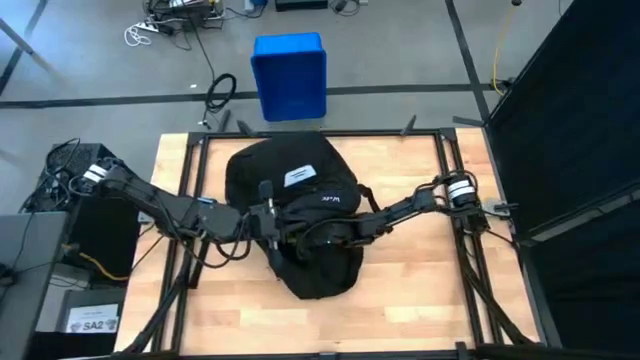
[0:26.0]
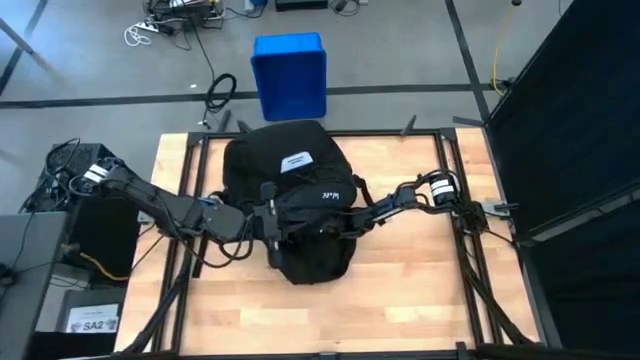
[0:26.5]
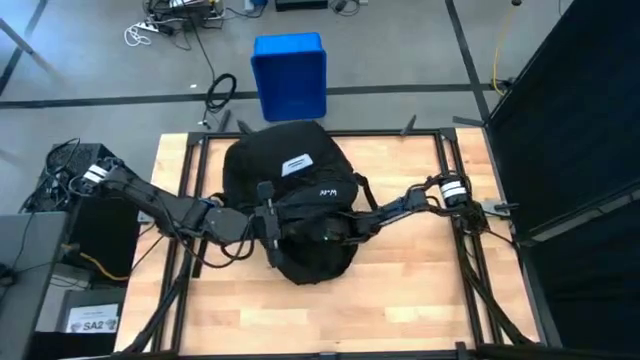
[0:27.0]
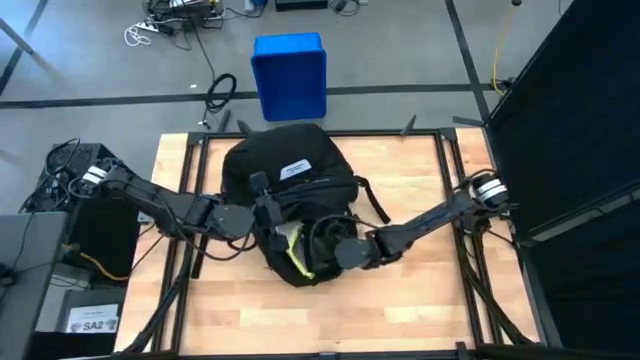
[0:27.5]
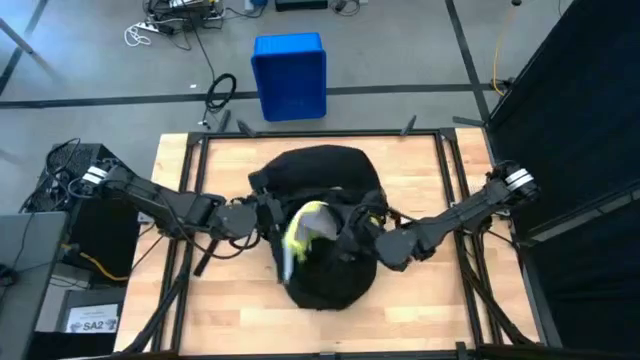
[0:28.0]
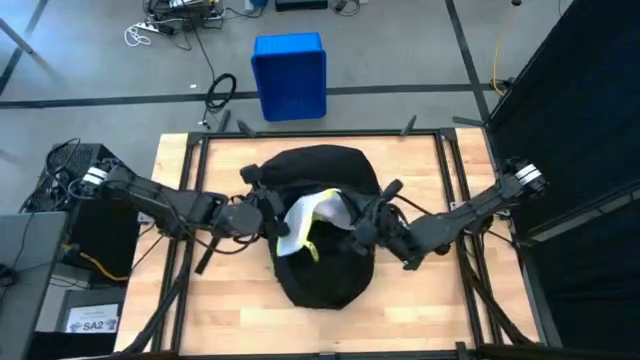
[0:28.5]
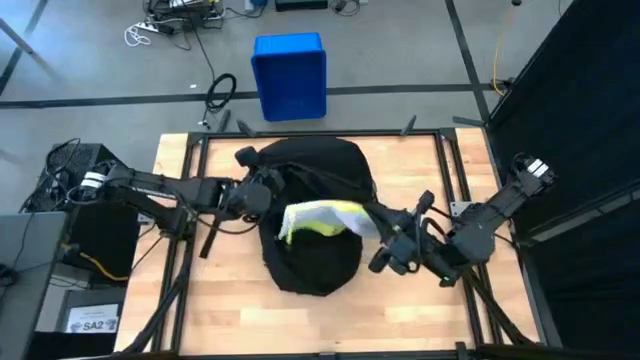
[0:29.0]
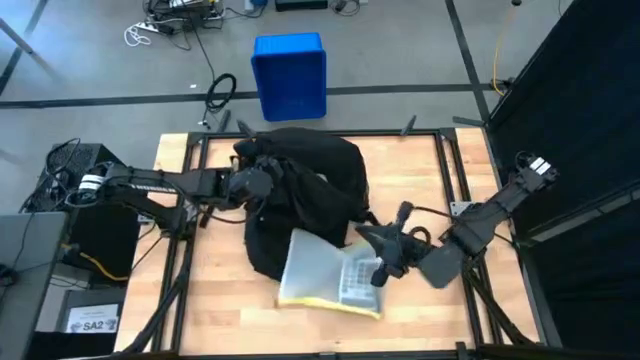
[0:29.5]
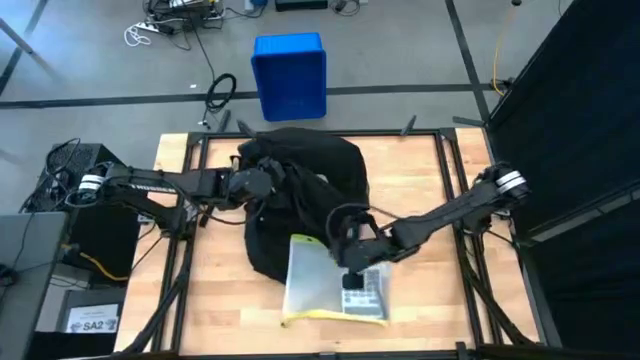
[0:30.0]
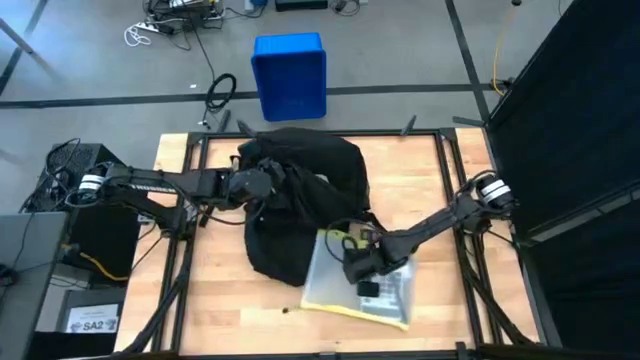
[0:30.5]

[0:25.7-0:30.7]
Task: Unpack backpack
Remove the zip bag from the backpack

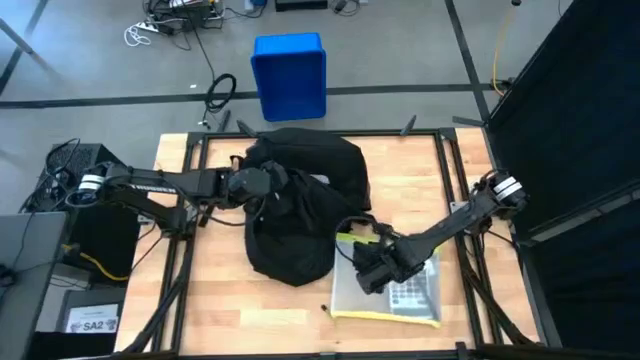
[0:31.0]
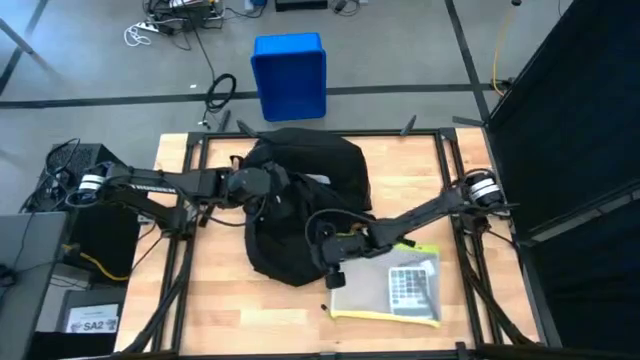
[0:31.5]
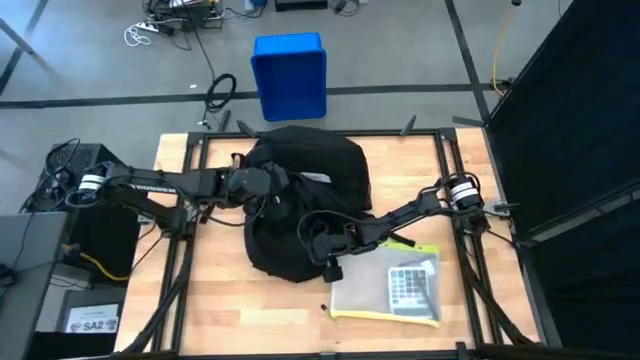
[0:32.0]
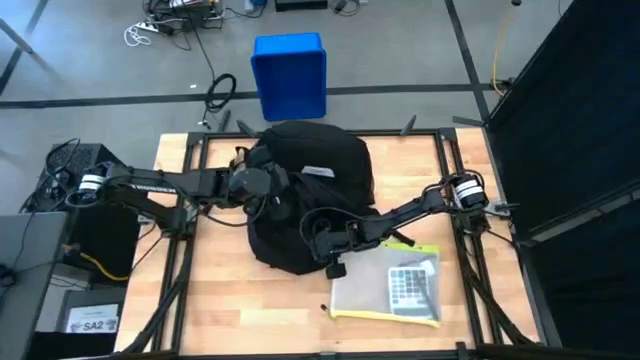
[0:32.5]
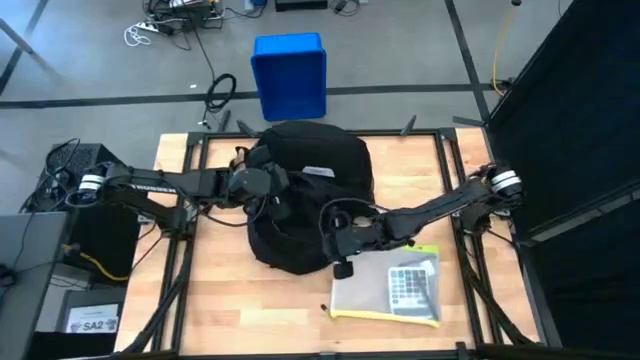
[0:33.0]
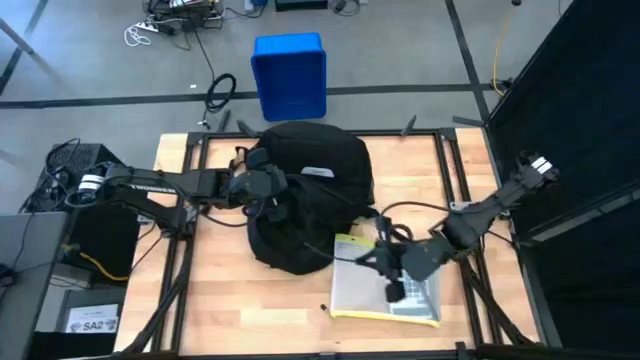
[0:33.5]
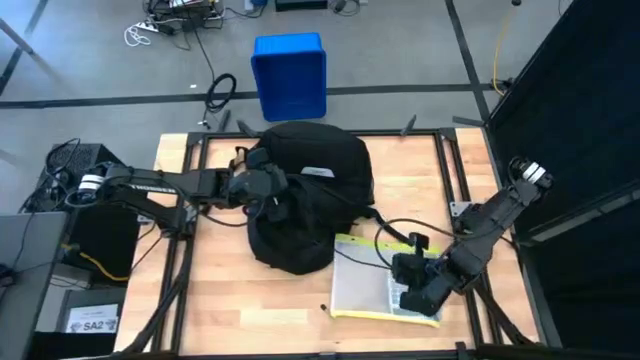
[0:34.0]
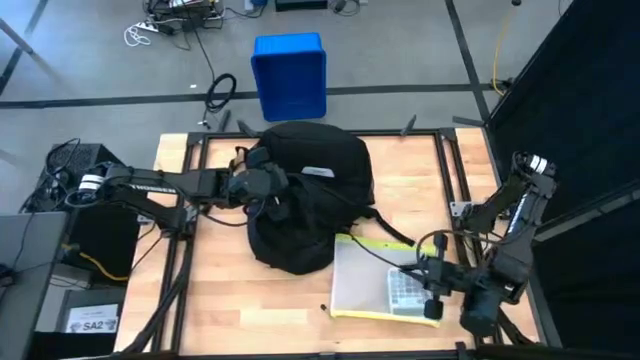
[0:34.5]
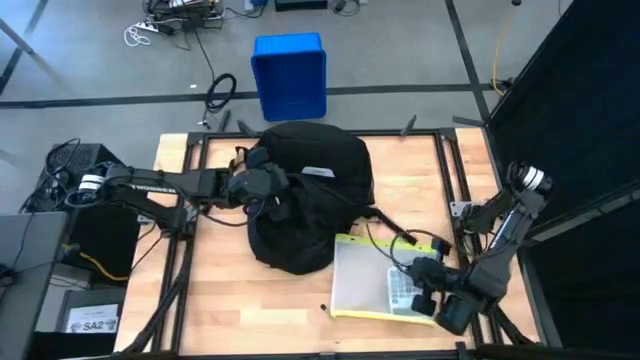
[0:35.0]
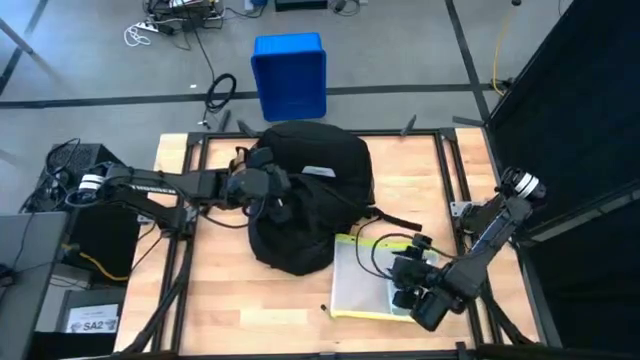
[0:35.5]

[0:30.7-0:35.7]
Remove the usb cable from the backpack

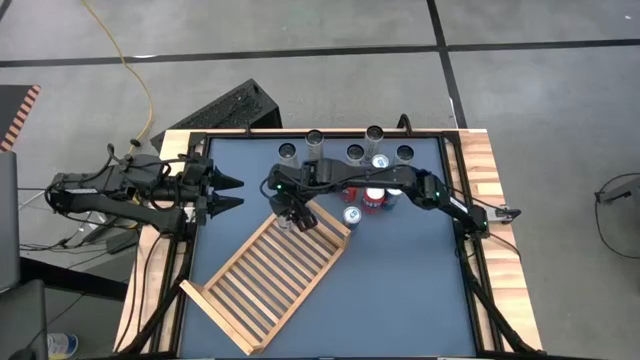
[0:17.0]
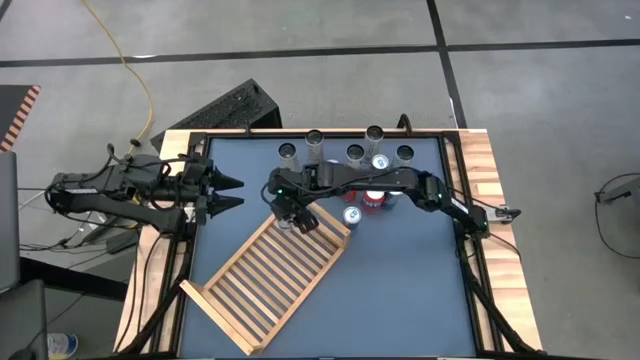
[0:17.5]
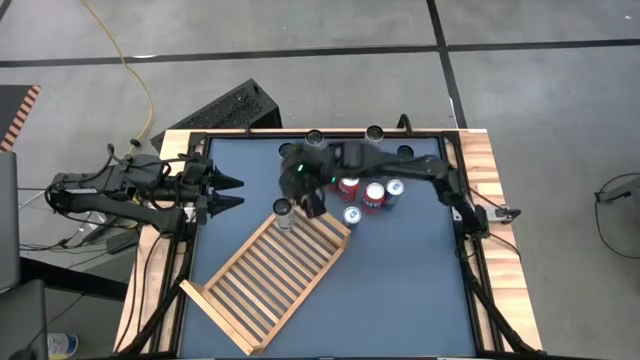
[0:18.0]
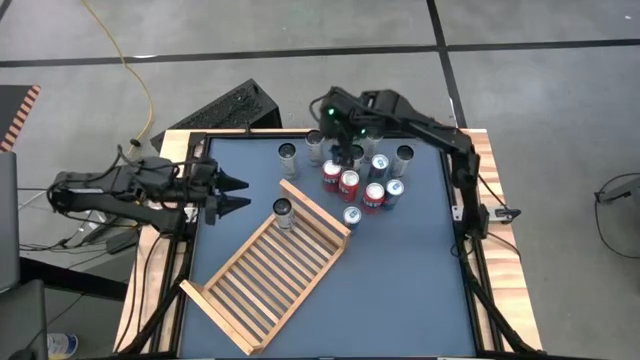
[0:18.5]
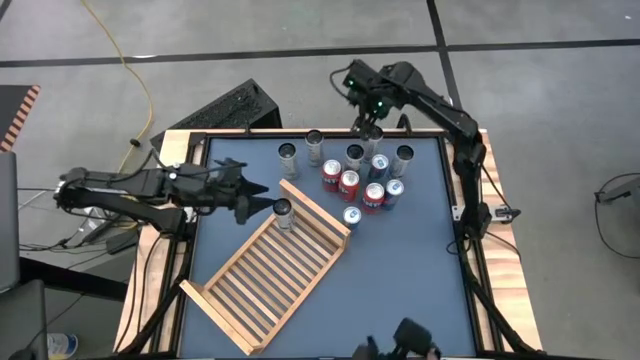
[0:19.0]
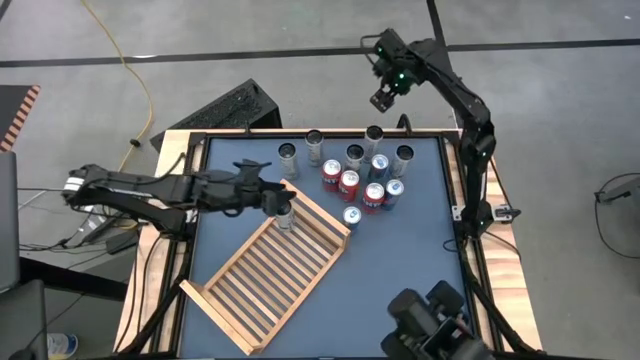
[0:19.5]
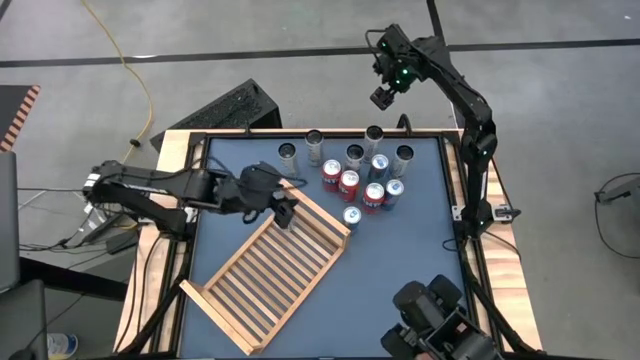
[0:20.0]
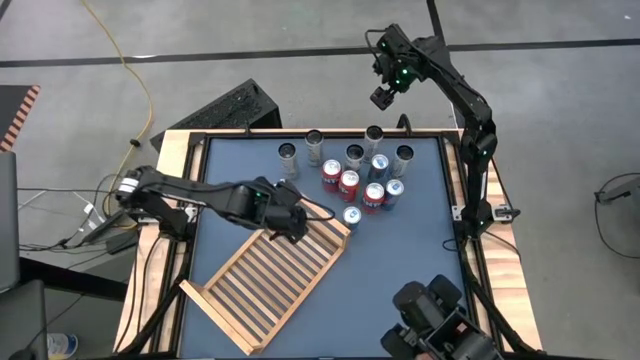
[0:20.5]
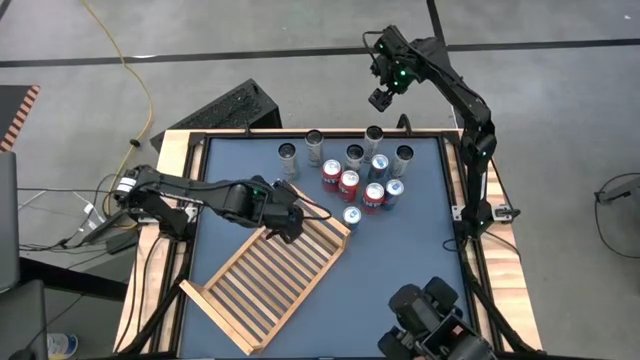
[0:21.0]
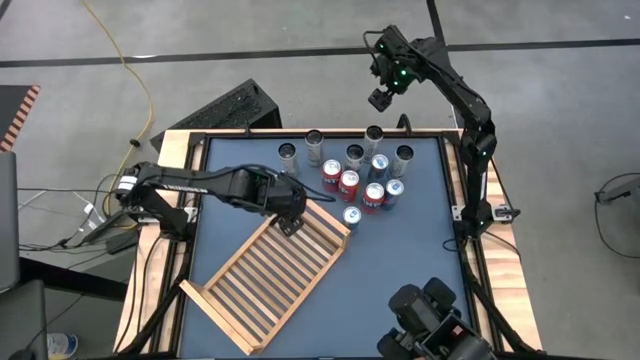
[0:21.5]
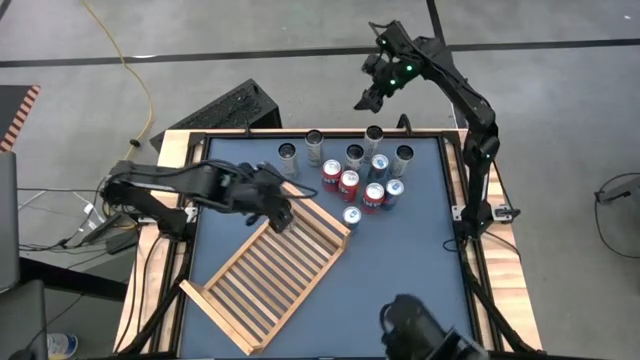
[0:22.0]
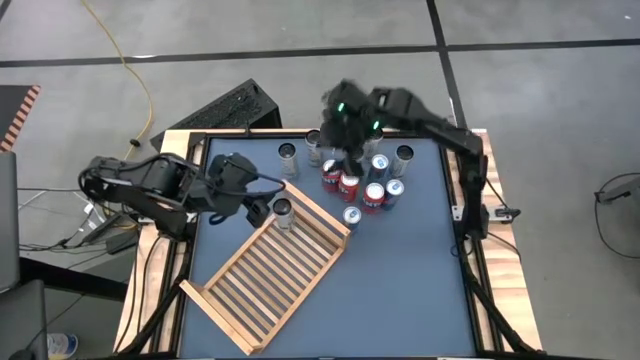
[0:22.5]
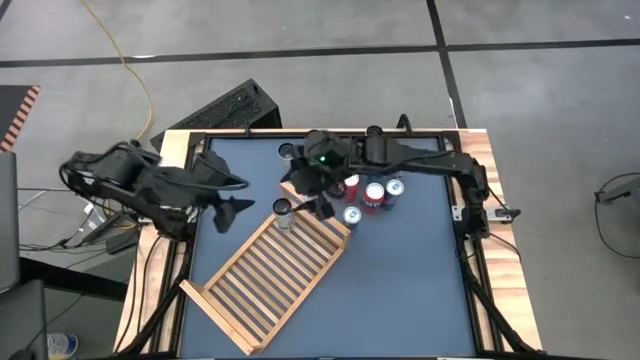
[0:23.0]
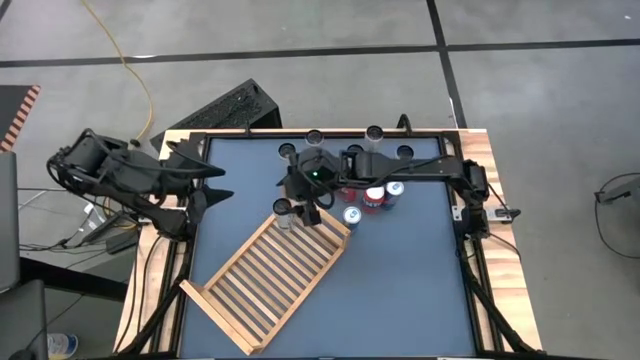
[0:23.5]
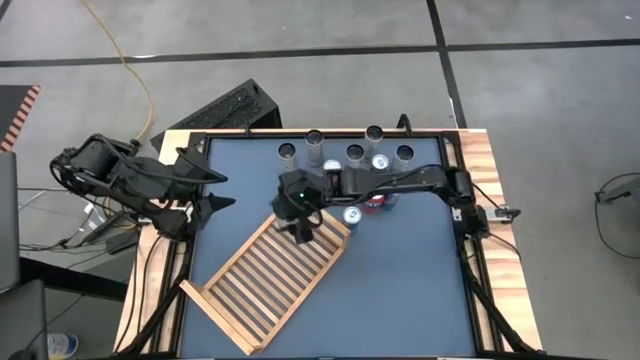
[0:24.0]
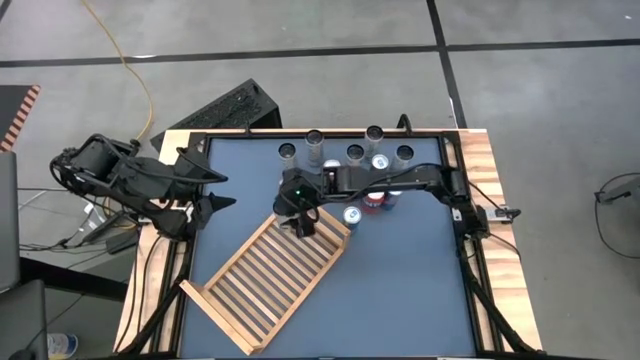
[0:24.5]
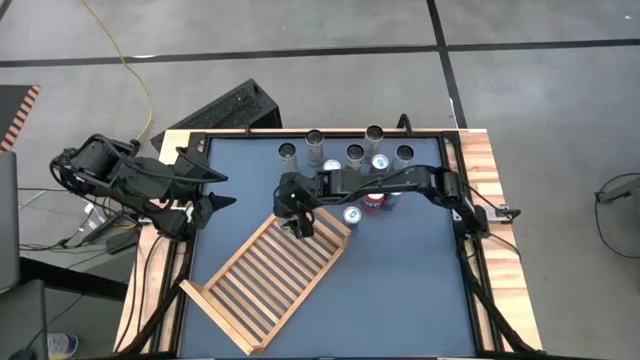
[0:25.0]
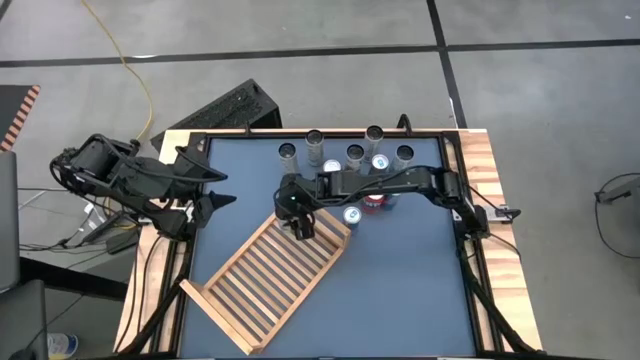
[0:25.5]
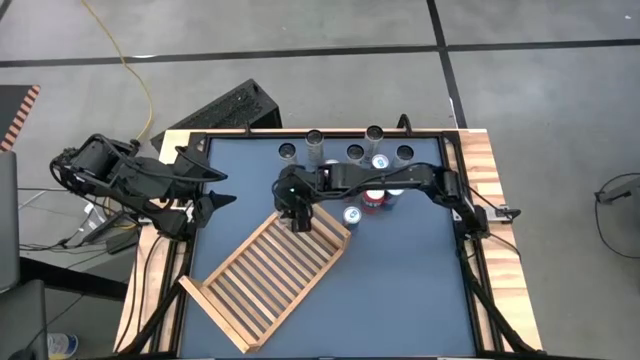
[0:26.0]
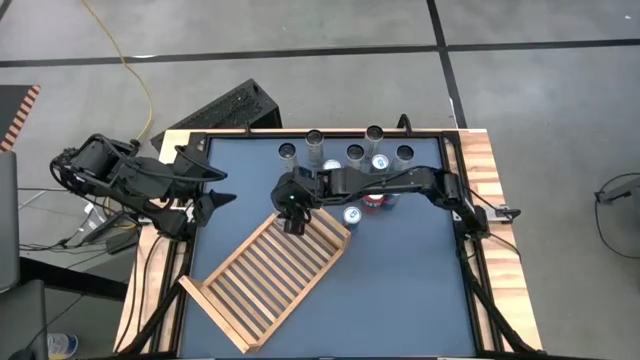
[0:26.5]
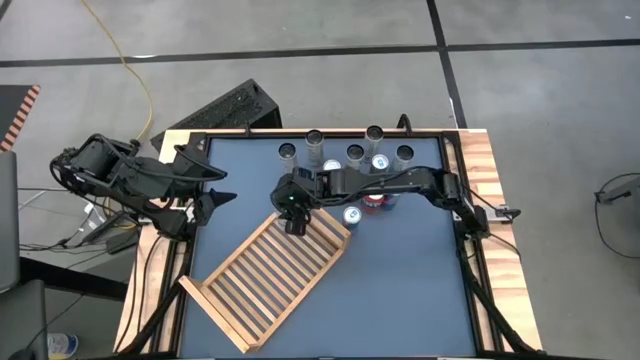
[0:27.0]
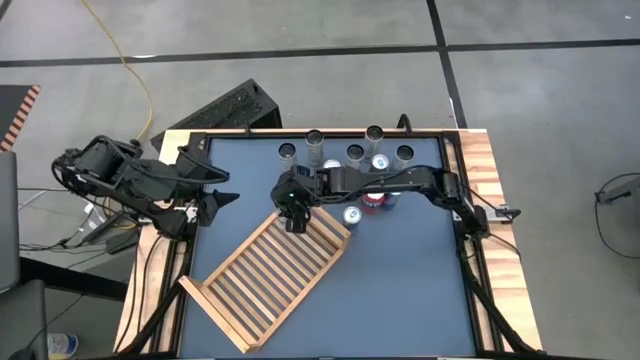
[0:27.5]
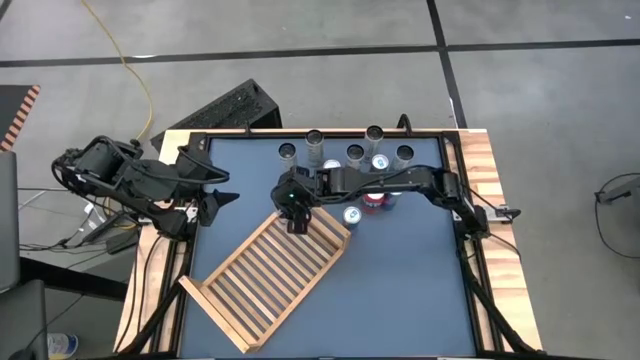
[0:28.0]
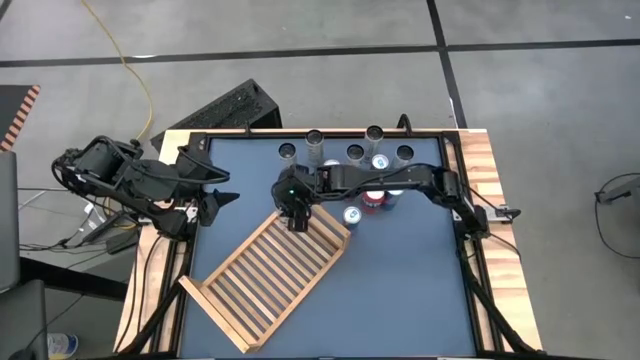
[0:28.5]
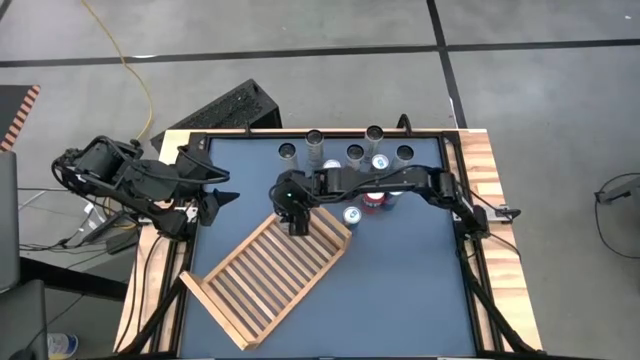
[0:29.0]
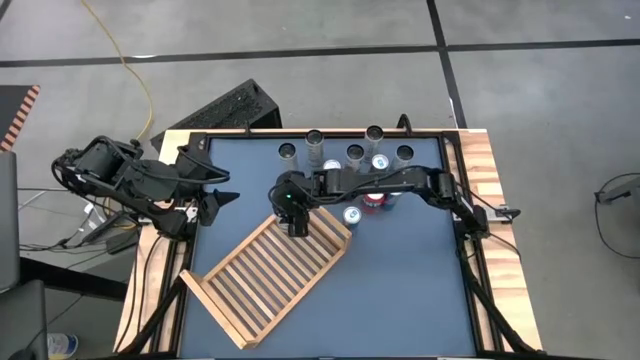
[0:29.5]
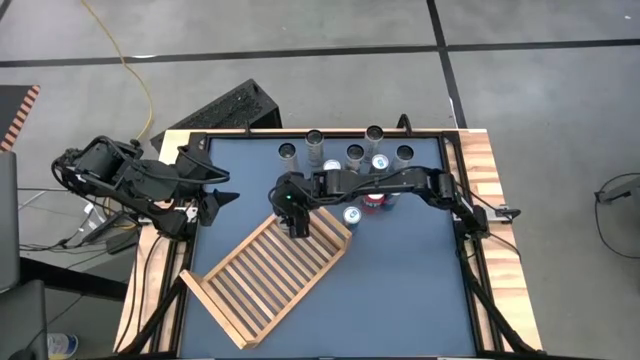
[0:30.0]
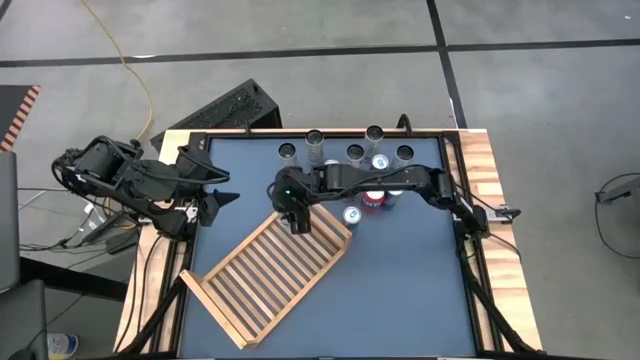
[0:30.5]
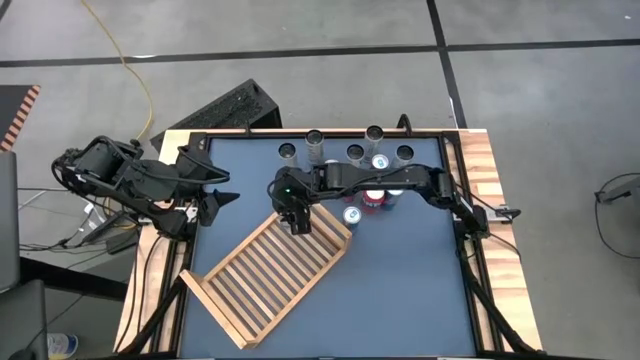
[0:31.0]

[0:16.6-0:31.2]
Task: Place canned beverage on shelf
Put the left white blue soda can on the shelf
